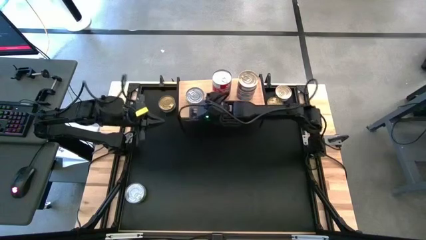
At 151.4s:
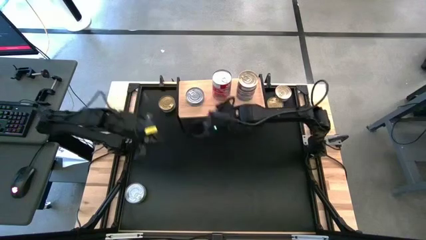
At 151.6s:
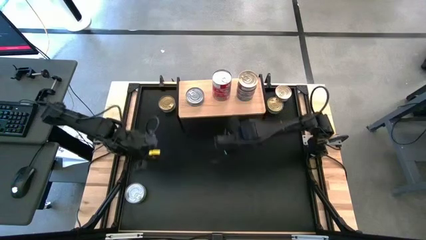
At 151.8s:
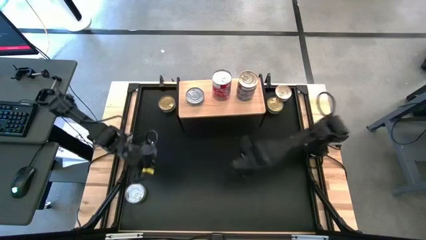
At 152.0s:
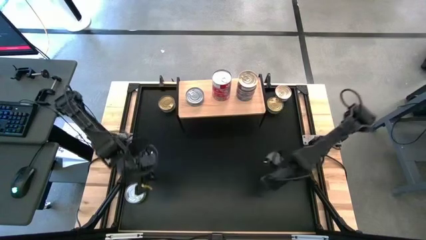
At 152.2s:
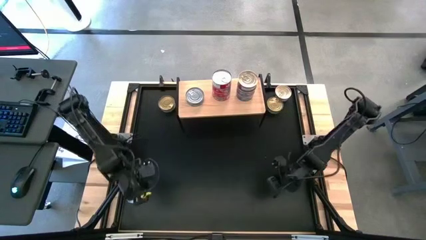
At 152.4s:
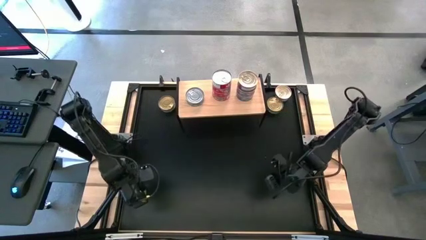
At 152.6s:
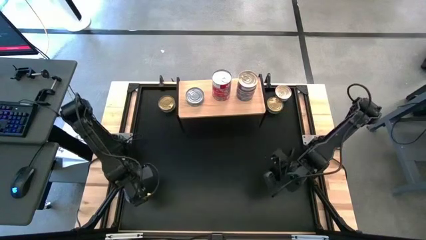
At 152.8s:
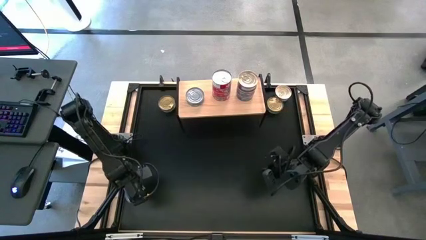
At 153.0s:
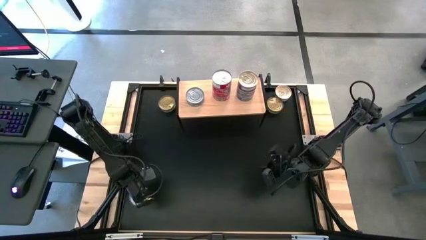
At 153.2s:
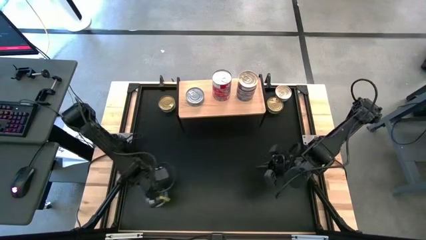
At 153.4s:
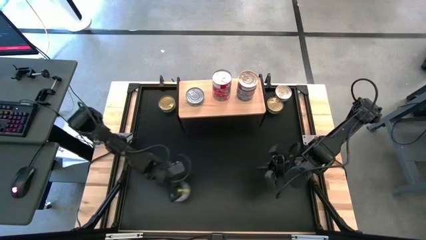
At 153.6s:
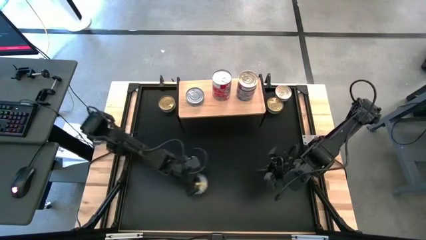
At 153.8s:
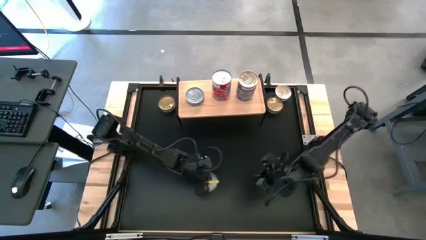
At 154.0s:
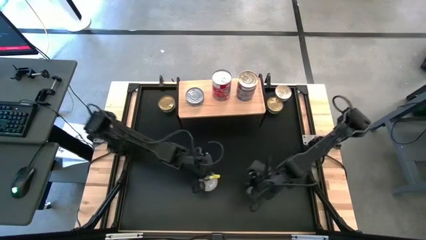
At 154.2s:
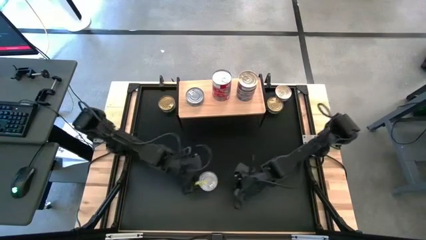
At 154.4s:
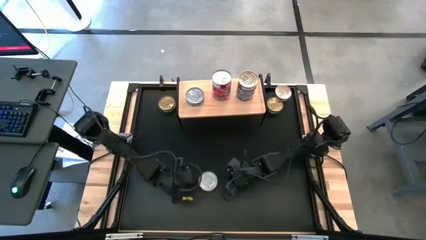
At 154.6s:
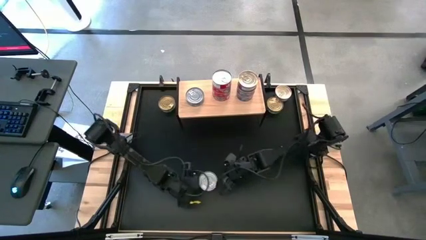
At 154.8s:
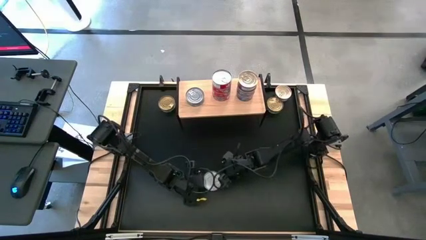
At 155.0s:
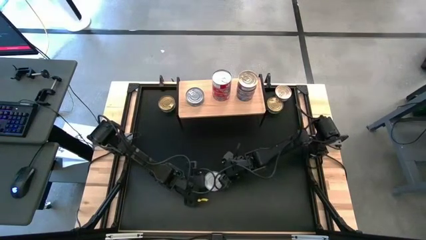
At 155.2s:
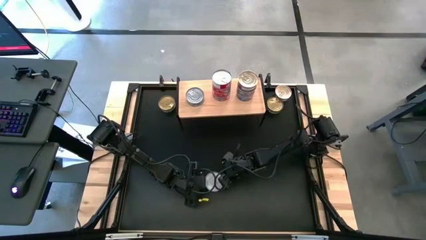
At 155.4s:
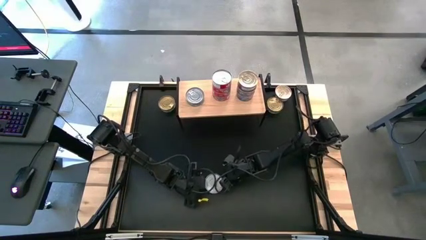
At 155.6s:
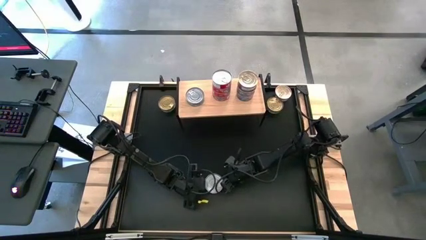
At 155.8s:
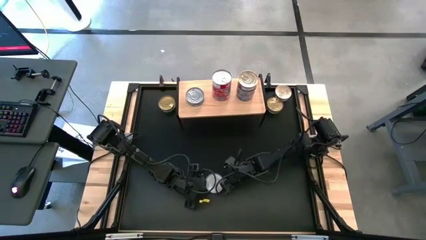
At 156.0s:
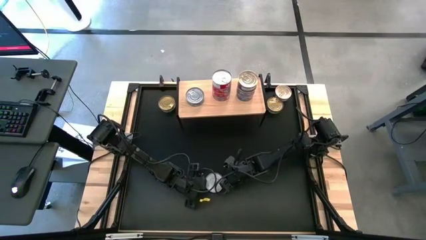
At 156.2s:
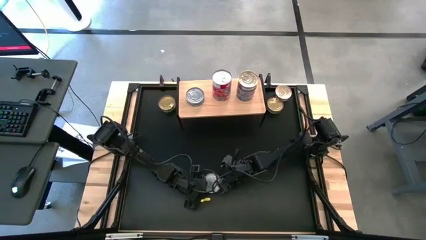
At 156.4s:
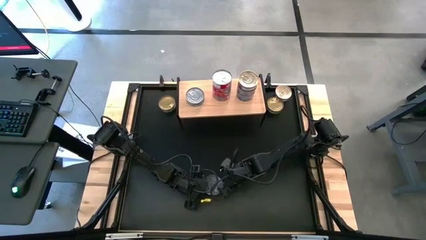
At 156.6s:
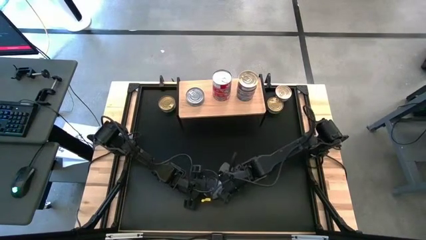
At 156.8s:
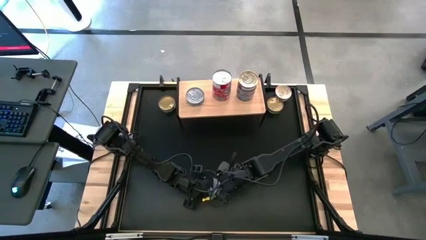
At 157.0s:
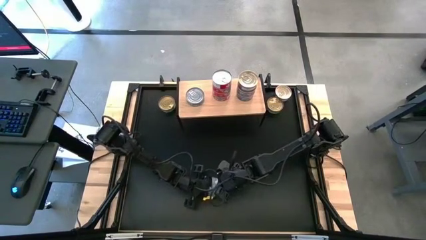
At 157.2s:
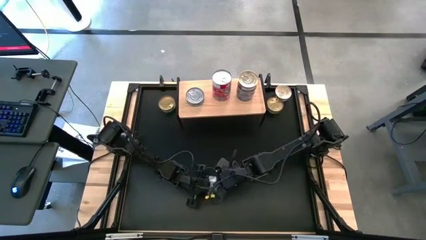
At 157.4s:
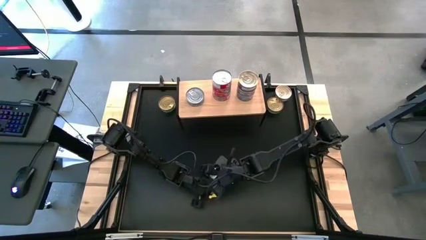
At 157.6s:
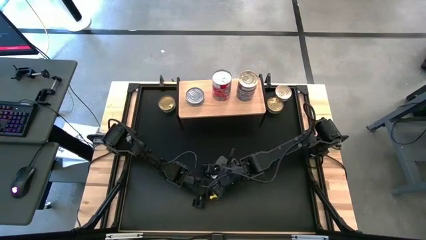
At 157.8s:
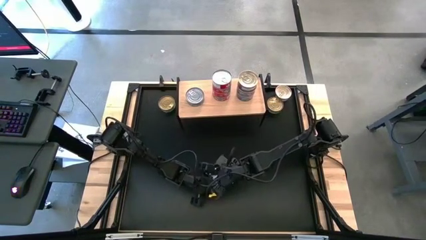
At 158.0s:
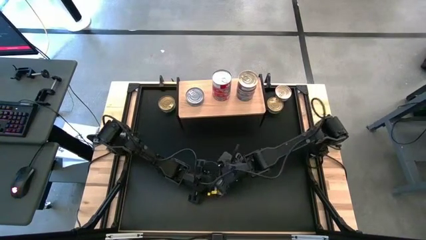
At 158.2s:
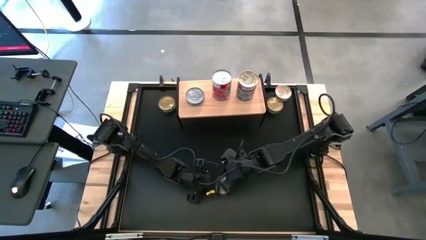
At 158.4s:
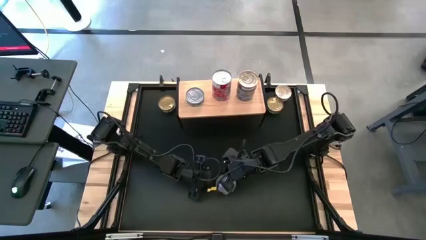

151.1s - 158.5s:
Task: Stack canned seafood by type on shelf
Stack the green tuna can on top of the green tuna can on the shelf

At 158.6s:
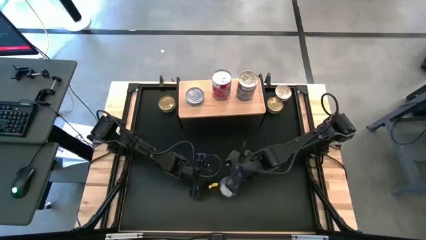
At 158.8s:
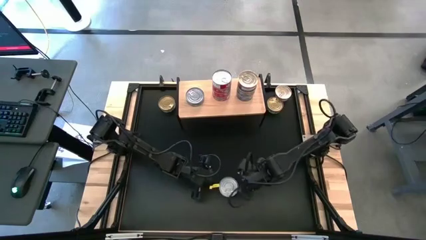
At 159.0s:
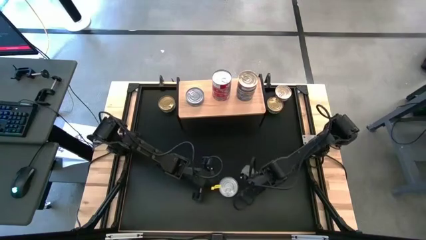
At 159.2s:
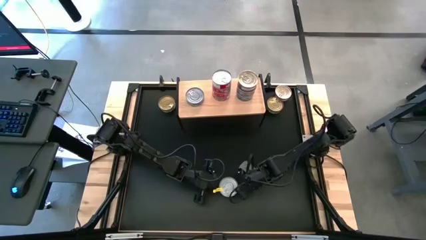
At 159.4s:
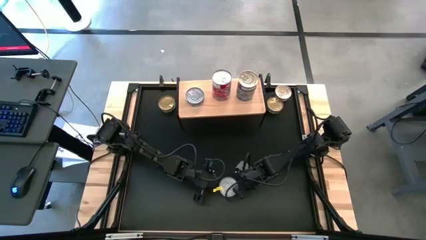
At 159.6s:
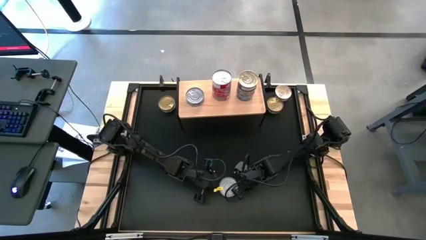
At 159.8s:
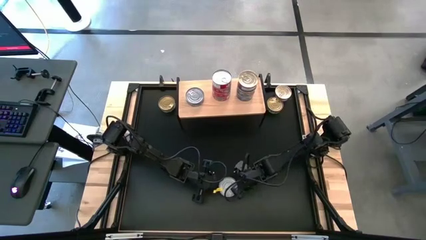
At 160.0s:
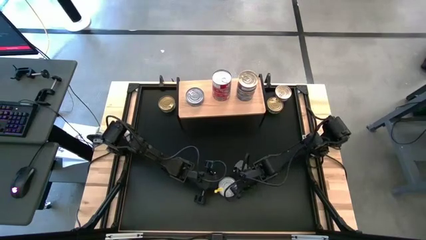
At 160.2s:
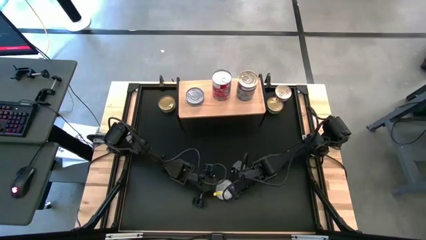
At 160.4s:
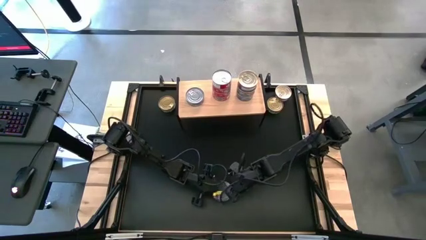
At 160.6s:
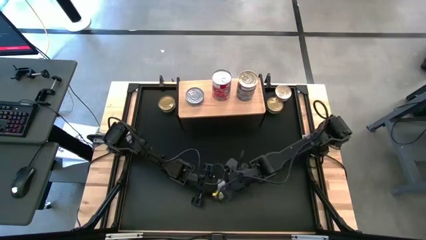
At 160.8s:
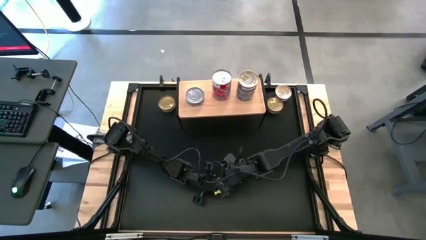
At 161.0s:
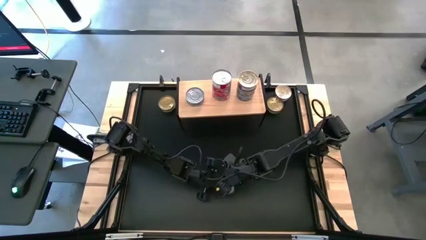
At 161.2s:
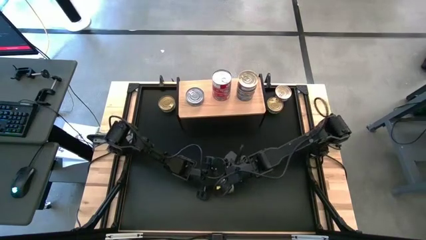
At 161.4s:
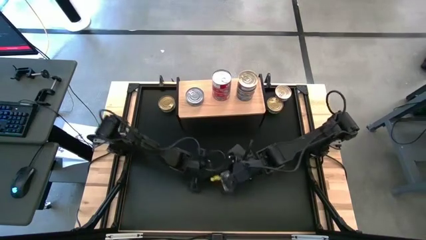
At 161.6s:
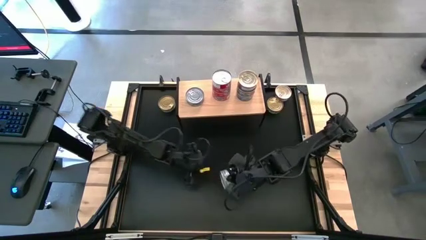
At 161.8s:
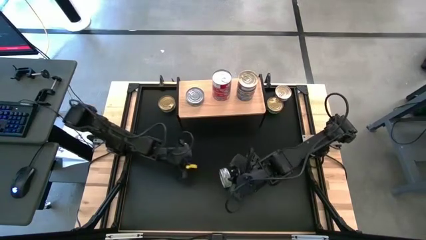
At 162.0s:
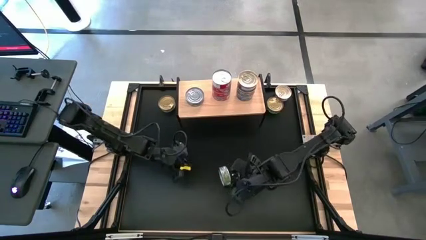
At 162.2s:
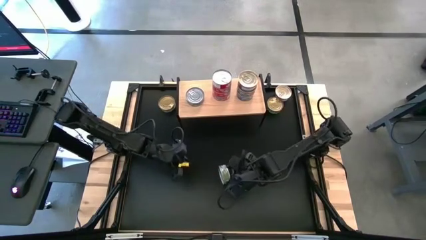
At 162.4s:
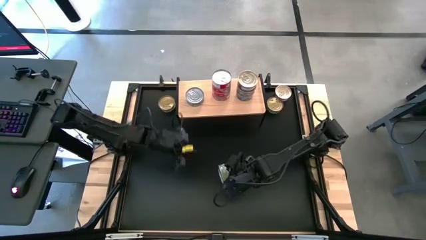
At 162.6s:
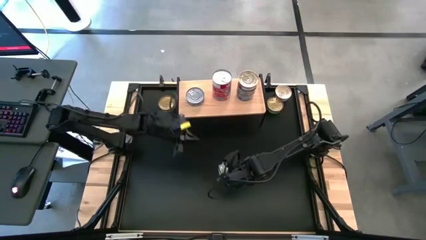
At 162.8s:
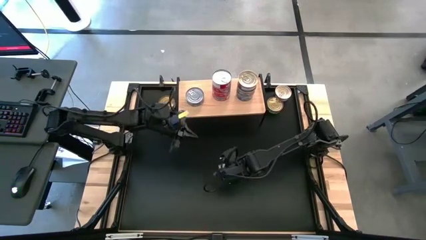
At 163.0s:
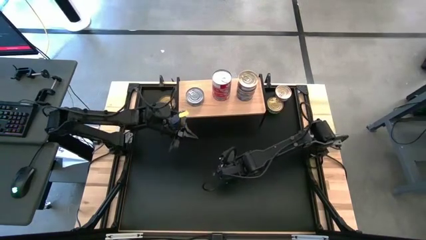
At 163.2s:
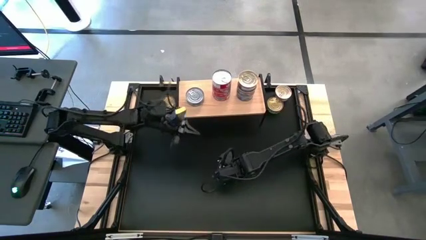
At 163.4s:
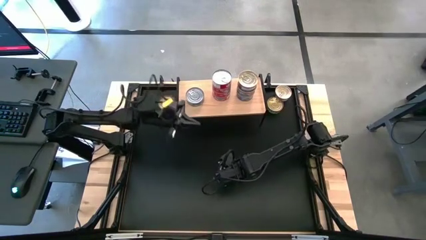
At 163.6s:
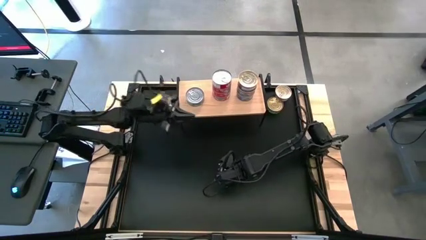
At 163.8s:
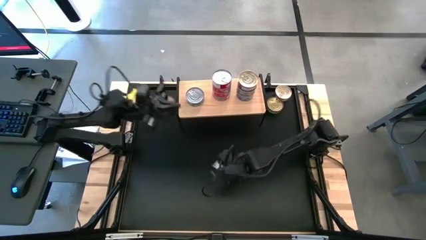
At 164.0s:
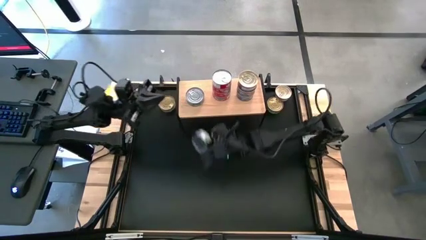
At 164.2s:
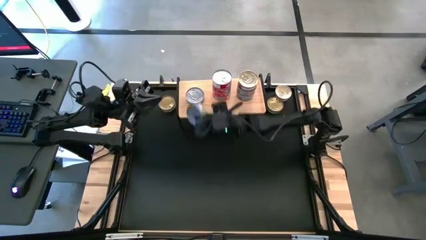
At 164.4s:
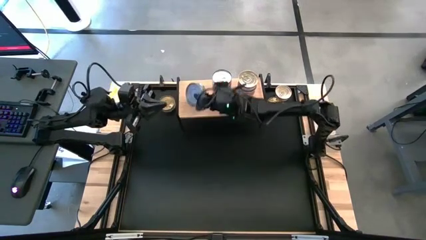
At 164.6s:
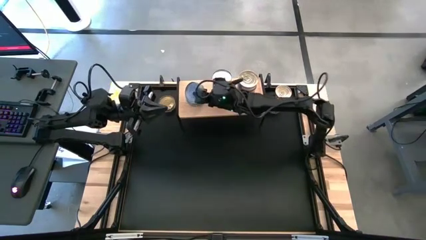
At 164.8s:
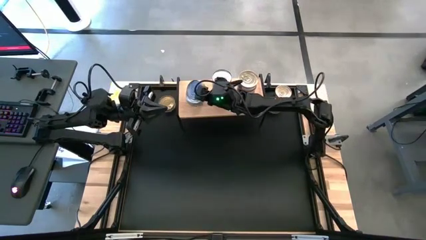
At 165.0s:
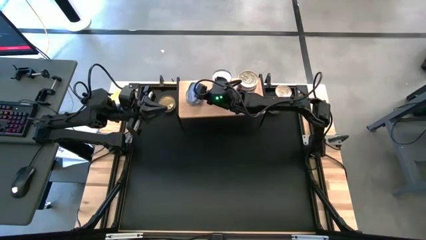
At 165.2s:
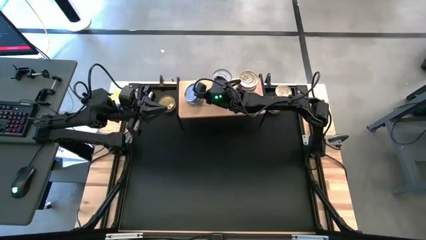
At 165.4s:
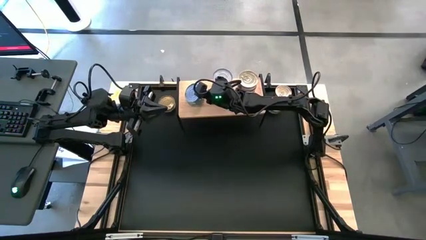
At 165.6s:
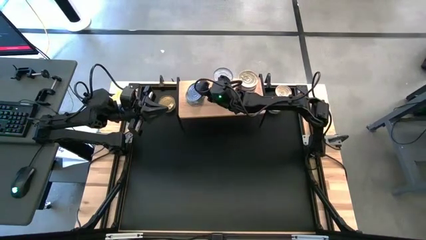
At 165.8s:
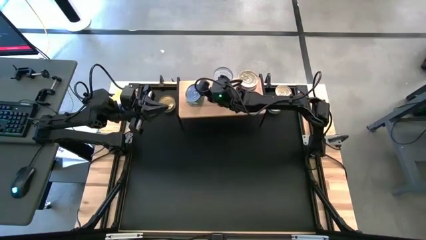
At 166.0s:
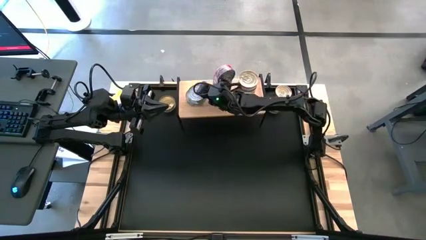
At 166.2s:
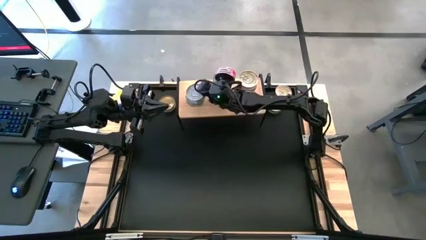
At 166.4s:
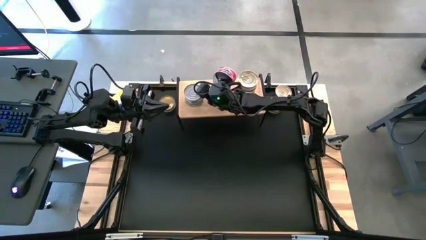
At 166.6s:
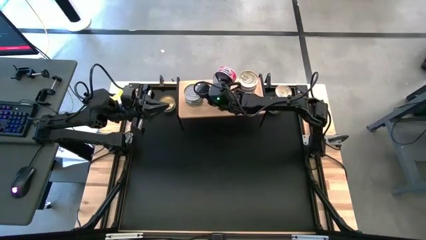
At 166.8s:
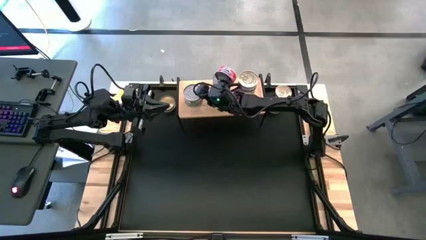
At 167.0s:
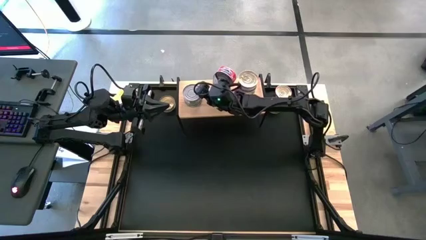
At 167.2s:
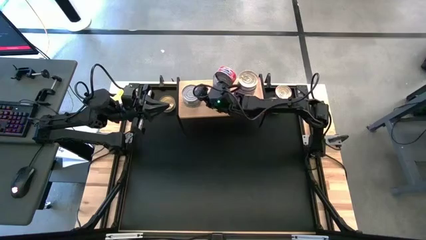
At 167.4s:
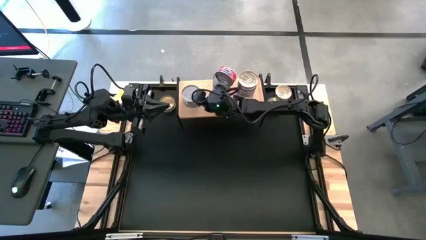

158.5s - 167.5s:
Stack the red tuna can on top of the red tuna can on the shelf
